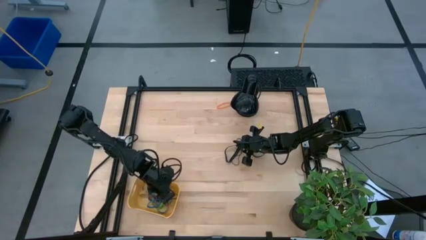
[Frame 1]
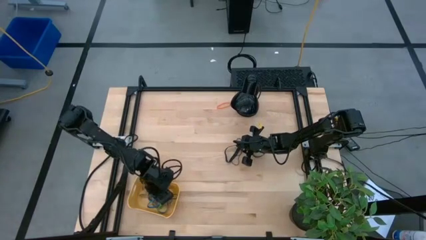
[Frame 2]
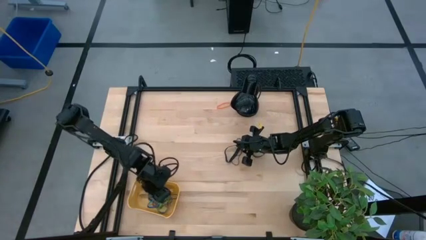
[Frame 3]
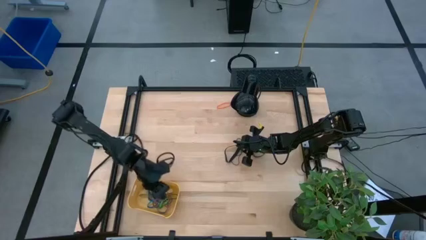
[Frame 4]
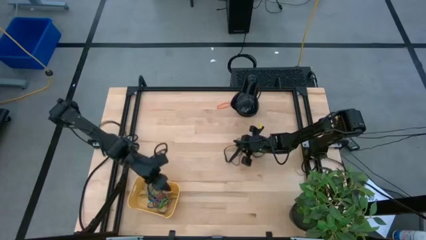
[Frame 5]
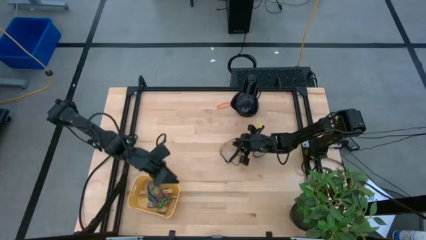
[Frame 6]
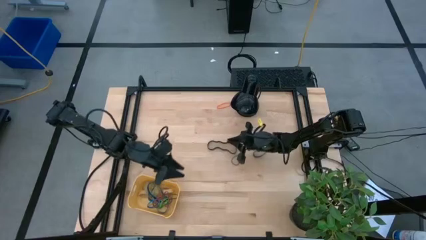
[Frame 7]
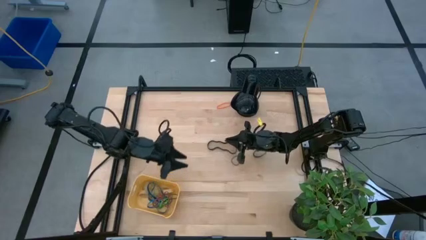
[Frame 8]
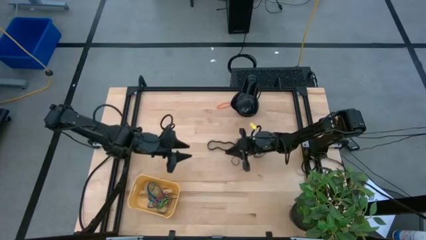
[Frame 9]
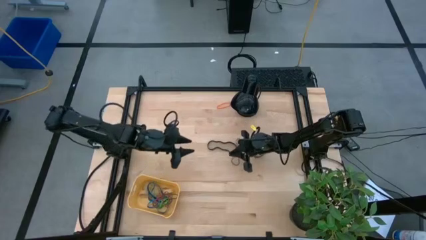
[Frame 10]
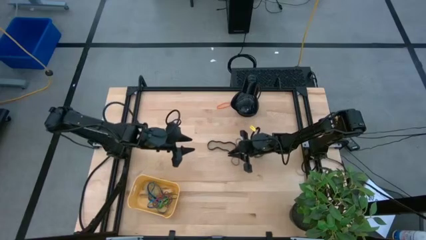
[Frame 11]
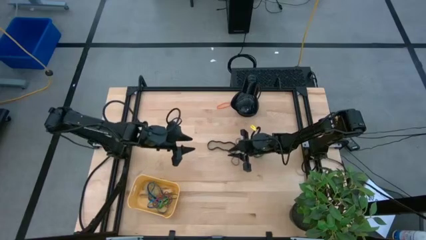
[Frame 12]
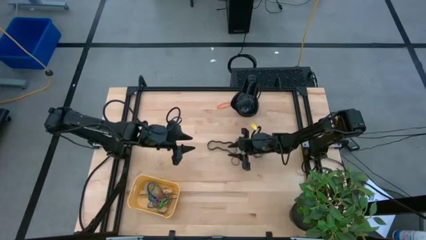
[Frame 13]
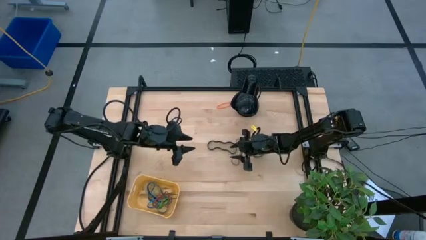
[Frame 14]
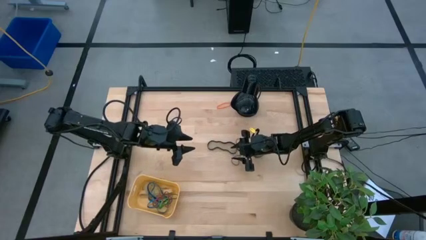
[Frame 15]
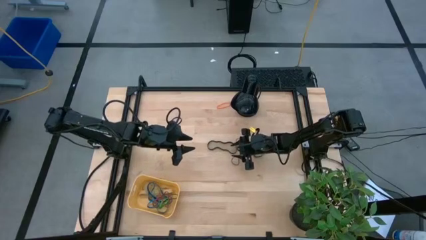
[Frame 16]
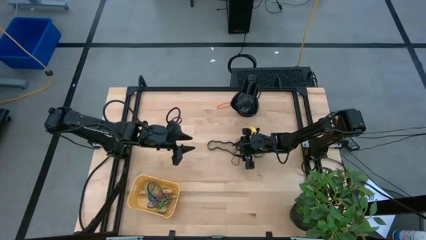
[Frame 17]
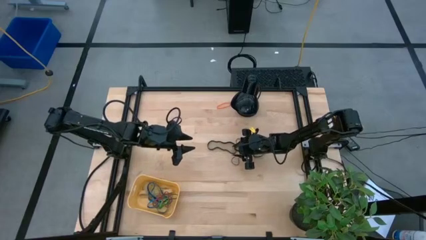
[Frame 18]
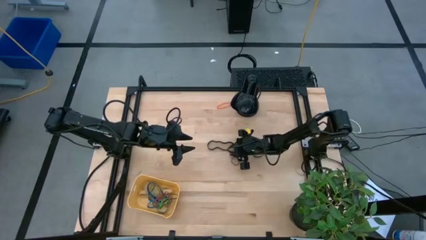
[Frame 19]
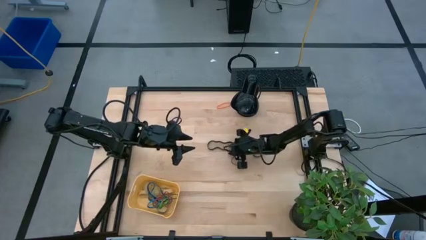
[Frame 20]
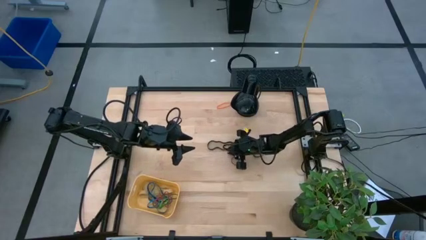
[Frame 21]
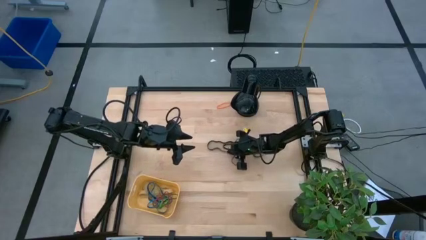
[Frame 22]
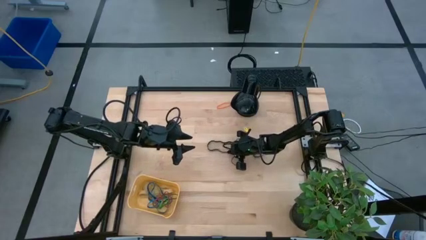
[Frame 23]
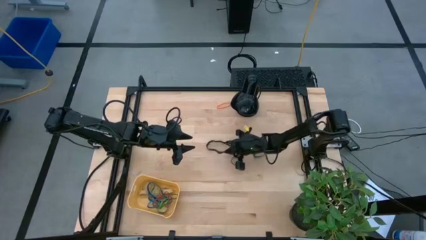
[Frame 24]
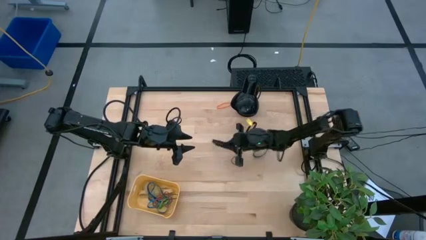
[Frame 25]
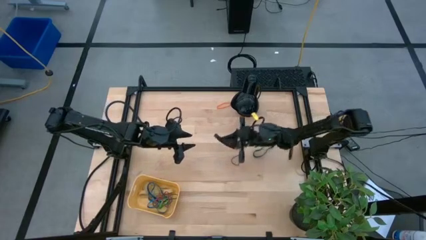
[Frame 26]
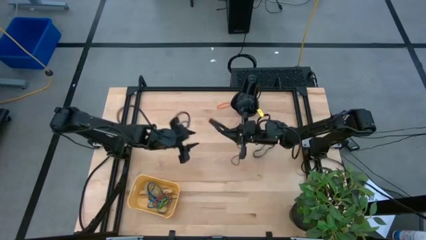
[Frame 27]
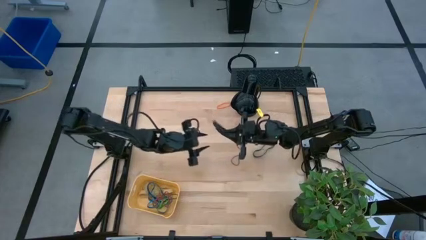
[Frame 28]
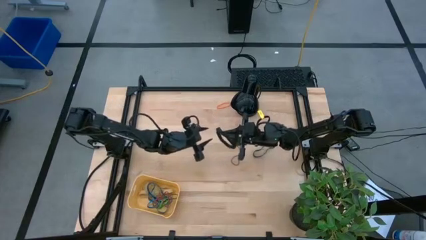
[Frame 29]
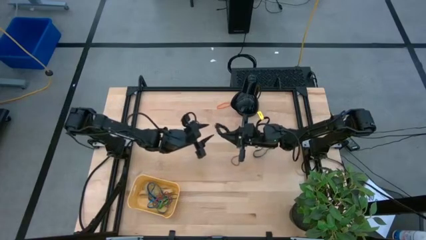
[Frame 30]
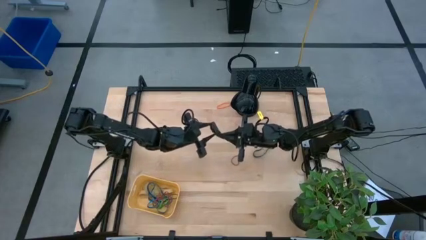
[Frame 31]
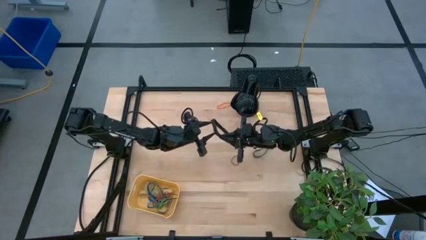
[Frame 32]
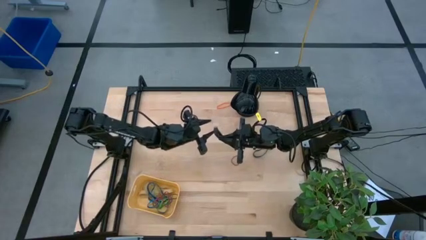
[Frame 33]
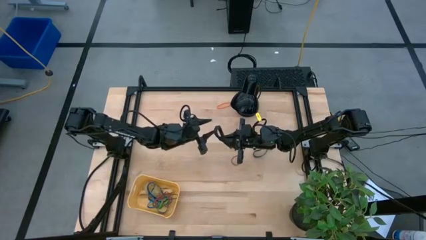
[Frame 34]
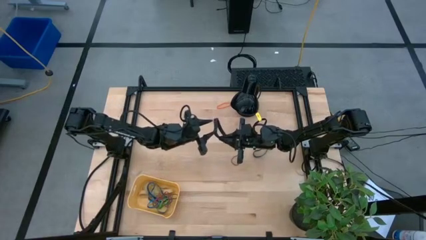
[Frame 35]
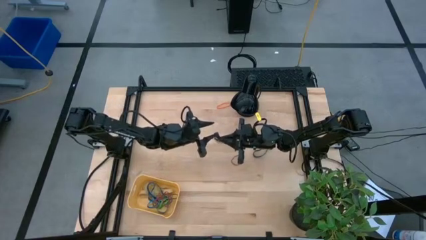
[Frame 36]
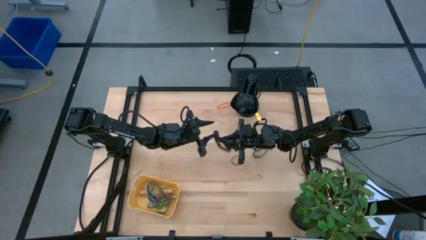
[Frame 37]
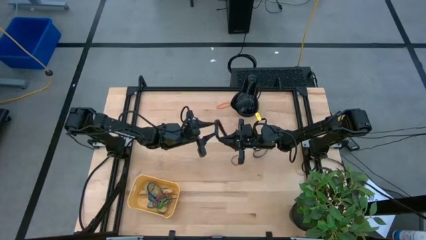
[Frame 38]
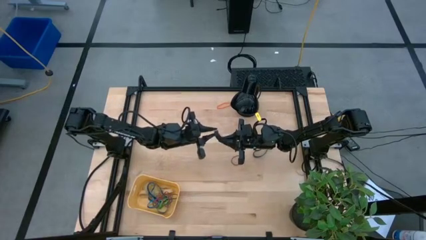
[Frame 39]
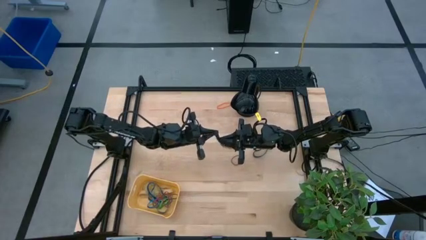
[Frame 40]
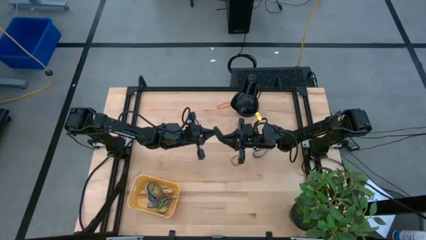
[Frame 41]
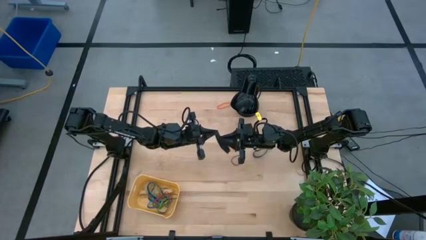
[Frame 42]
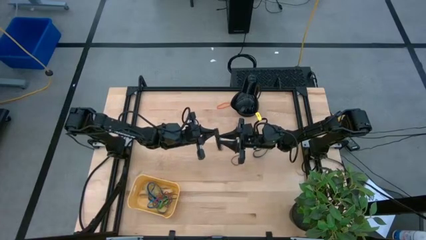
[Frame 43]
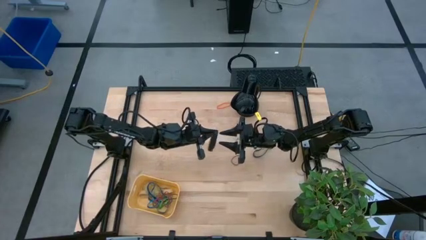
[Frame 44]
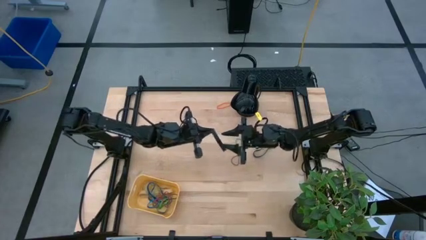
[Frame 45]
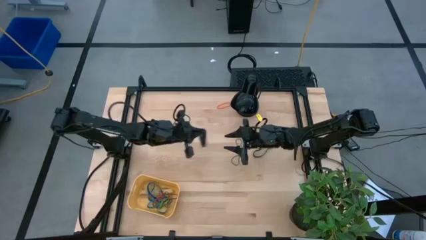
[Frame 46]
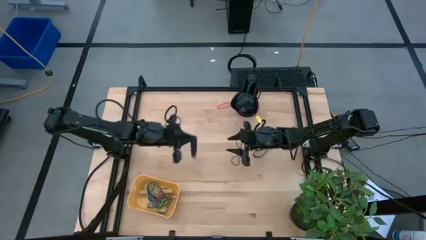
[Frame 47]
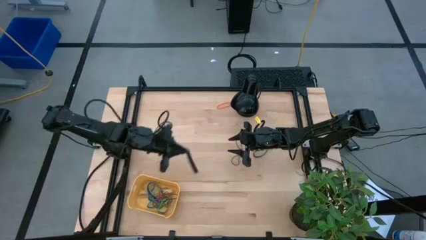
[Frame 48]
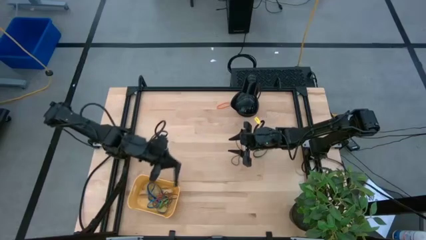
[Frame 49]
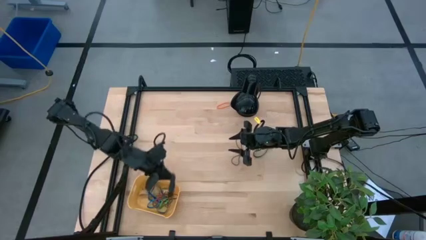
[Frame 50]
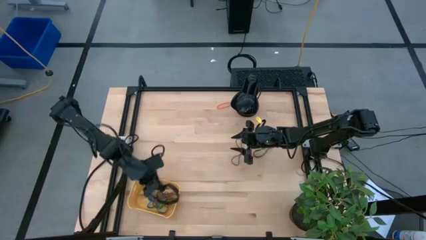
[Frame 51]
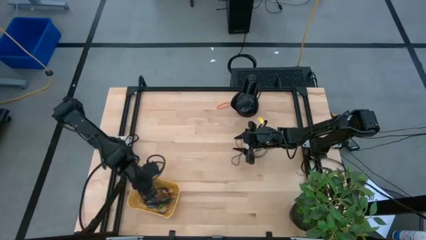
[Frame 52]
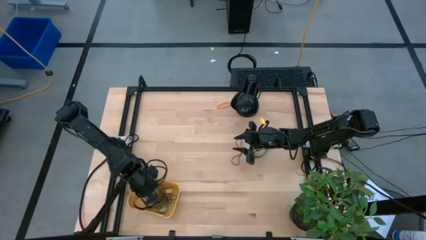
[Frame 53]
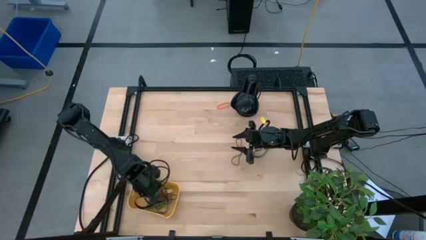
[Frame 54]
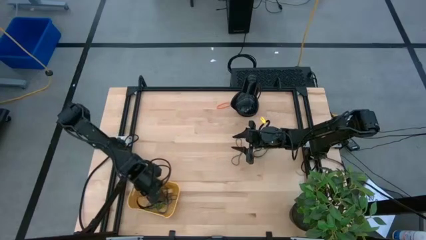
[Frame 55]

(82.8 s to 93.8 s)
Task: Pick and place rubber bands into bin
Put the left black rubberband into the yellow bin

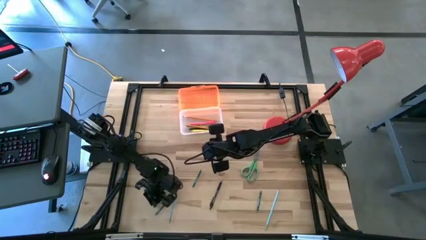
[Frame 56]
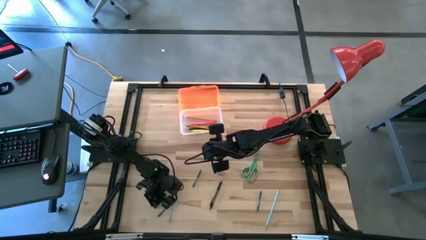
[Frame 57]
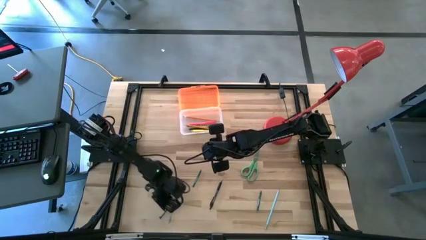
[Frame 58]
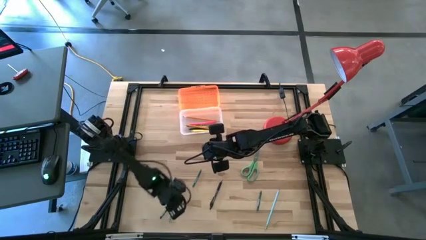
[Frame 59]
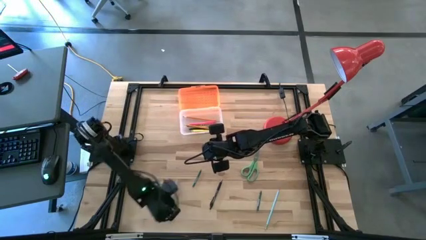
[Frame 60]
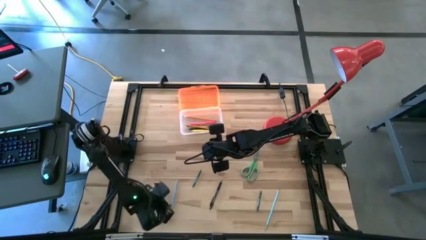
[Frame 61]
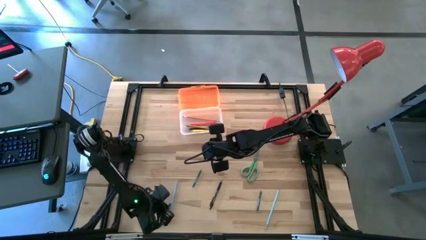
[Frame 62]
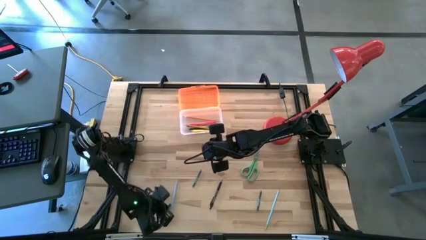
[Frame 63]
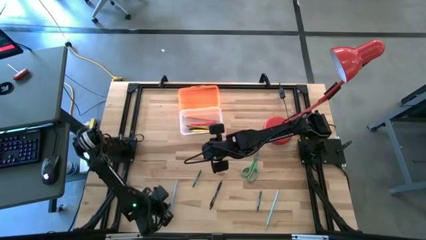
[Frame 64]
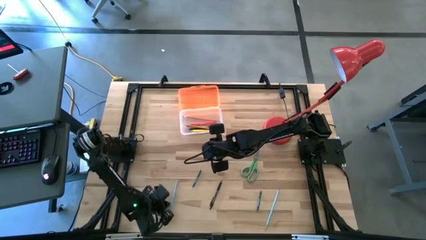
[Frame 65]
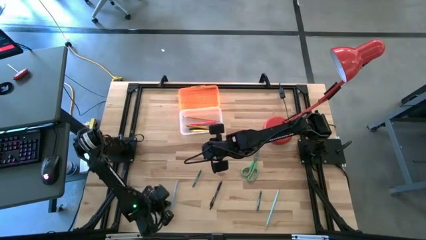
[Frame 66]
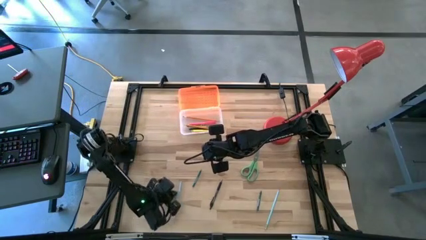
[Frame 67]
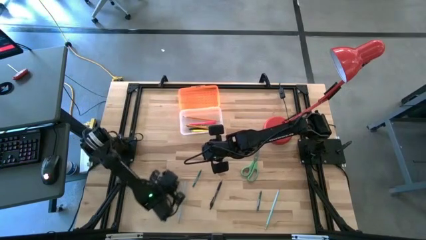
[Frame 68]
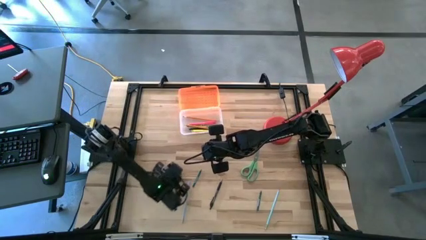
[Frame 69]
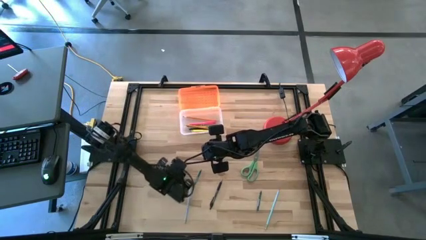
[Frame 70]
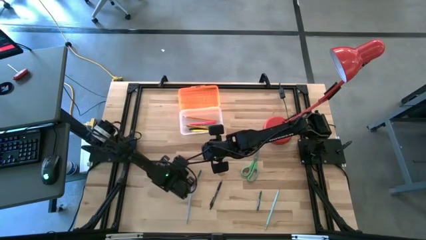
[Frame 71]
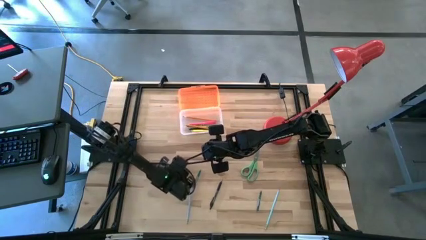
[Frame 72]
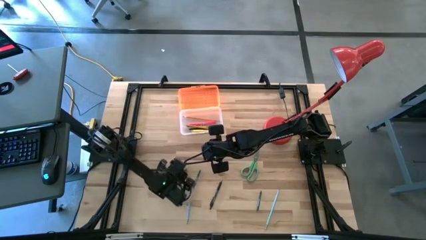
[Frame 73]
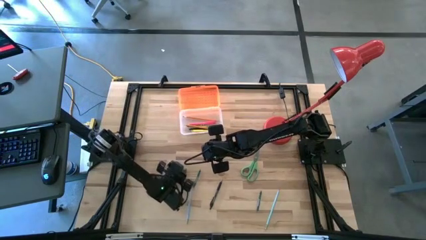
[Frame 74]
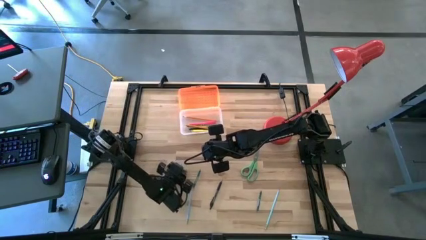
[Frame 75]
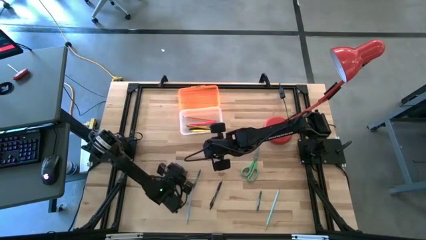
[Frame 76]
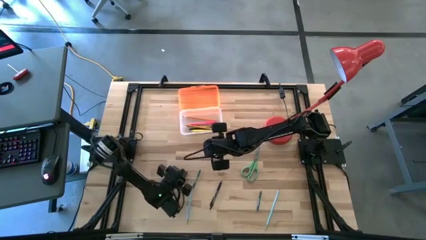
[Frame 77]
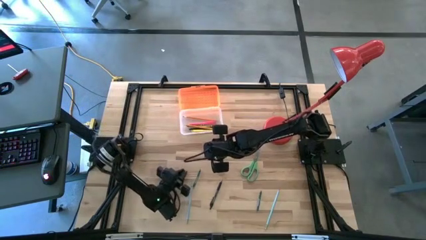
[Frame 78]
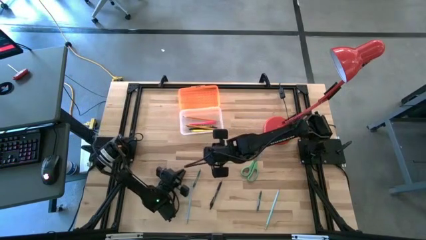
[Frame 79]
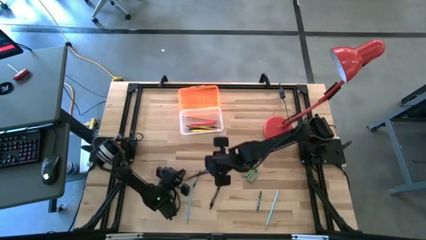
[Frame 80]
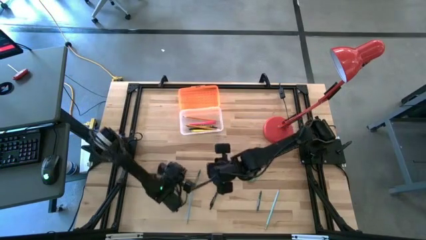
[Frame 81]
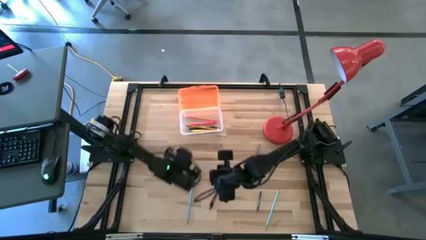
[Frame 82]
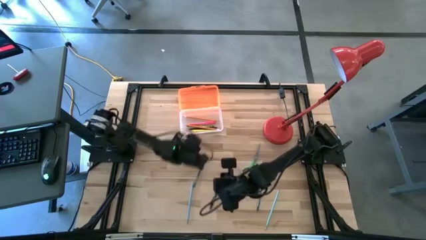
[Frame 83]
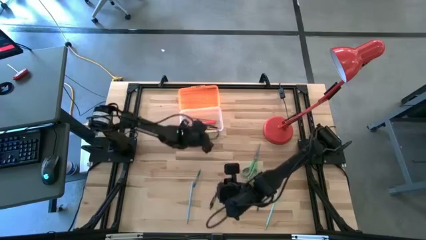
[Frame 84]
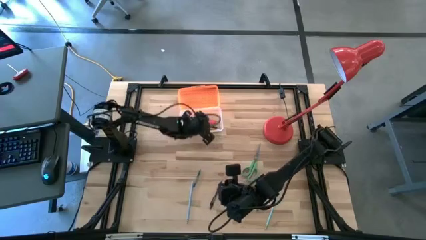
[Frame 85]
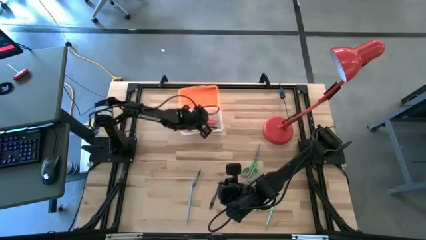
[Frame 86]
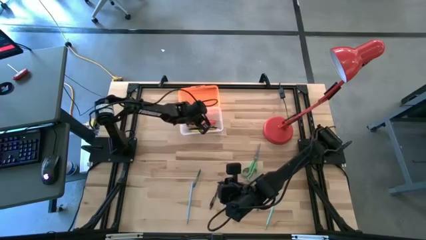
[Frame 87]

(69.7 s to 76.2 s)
Task: Pick & place school supplies into a supply box
Put the left dark green crayon into the orange supply box
